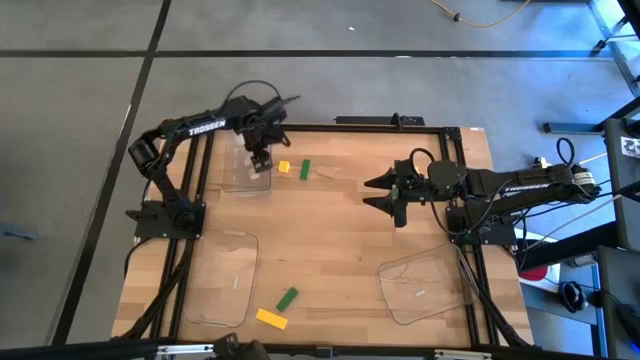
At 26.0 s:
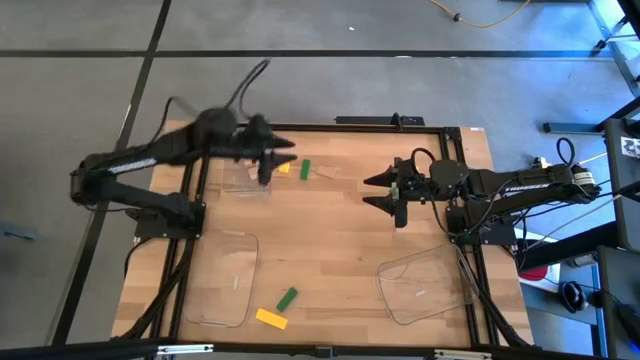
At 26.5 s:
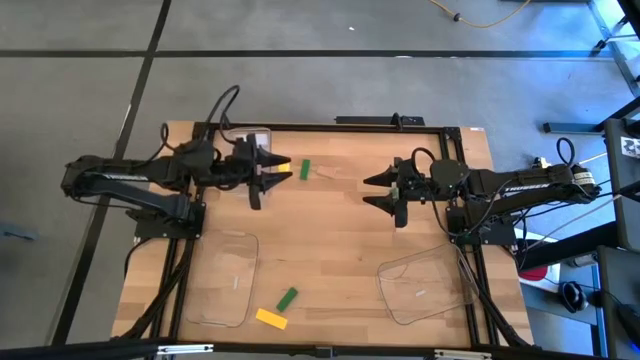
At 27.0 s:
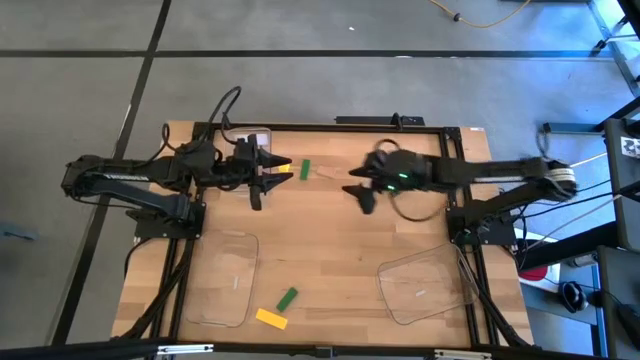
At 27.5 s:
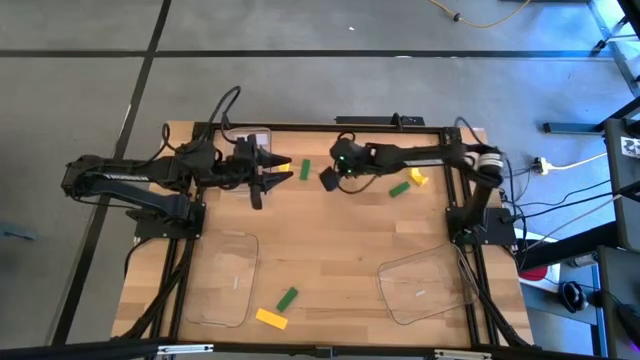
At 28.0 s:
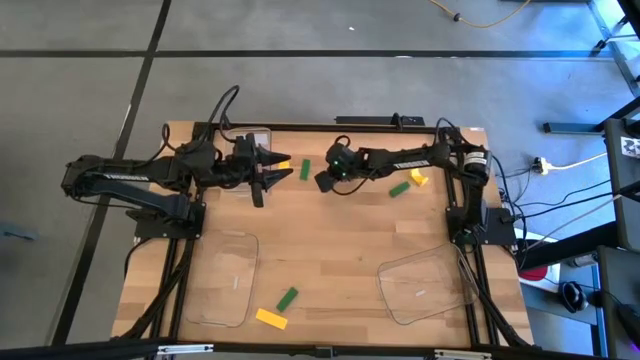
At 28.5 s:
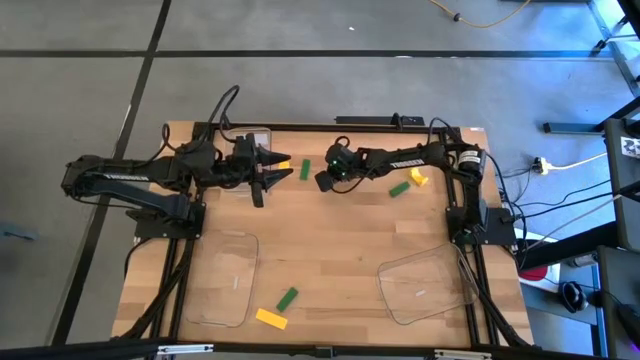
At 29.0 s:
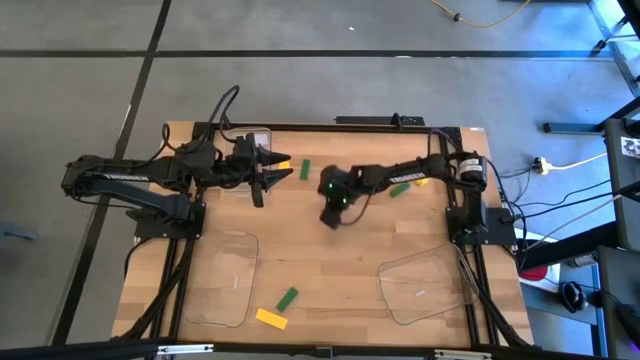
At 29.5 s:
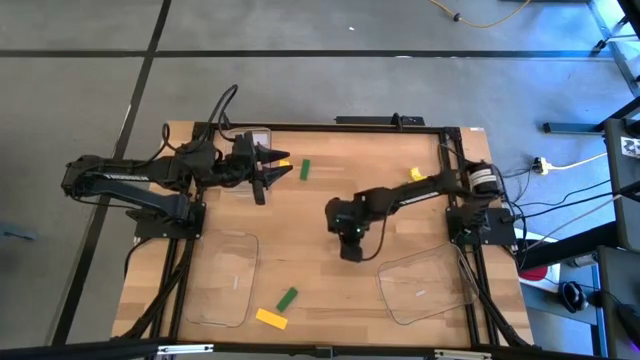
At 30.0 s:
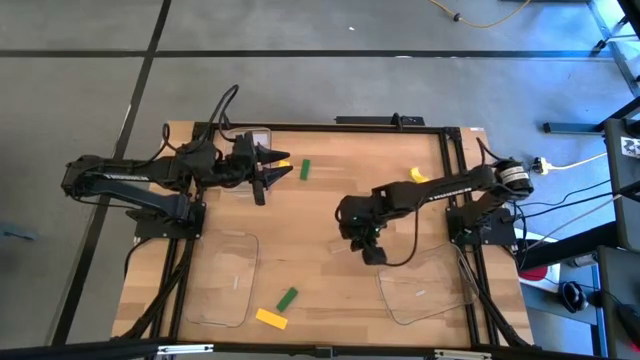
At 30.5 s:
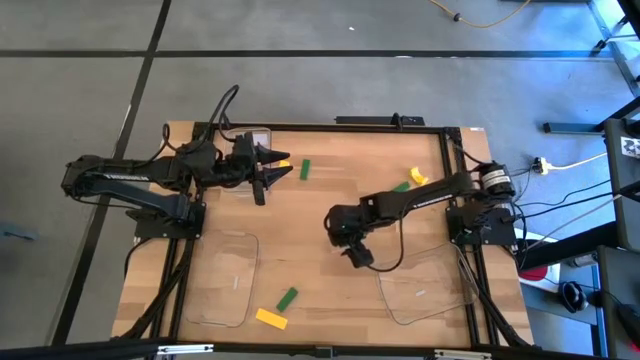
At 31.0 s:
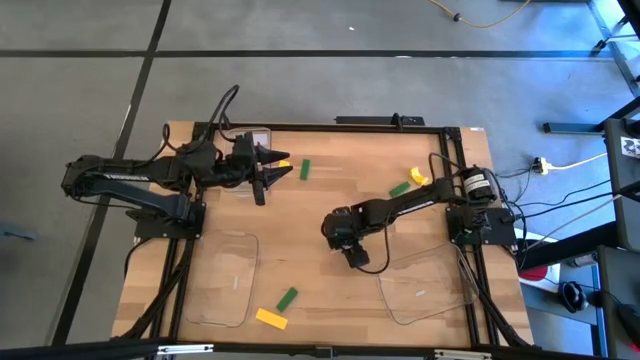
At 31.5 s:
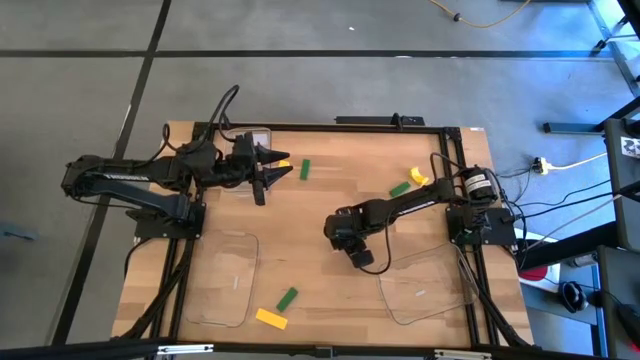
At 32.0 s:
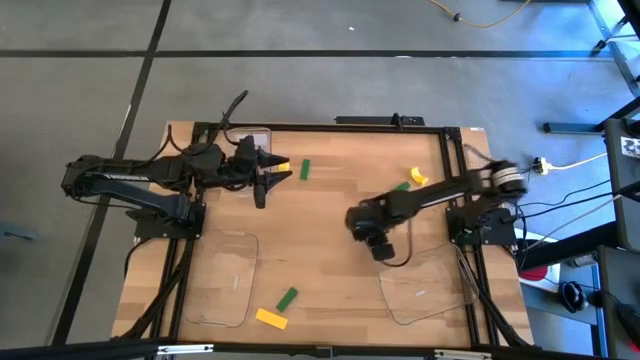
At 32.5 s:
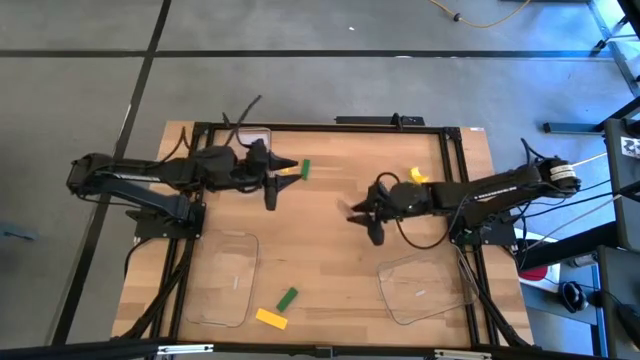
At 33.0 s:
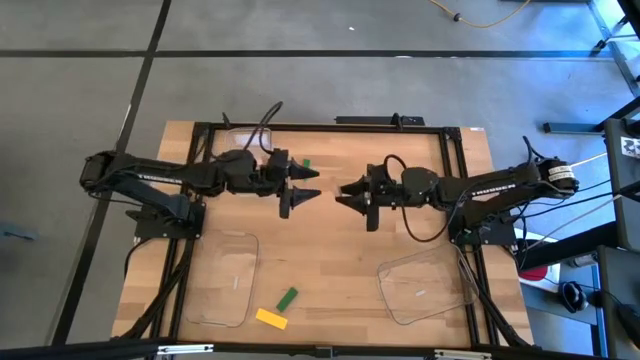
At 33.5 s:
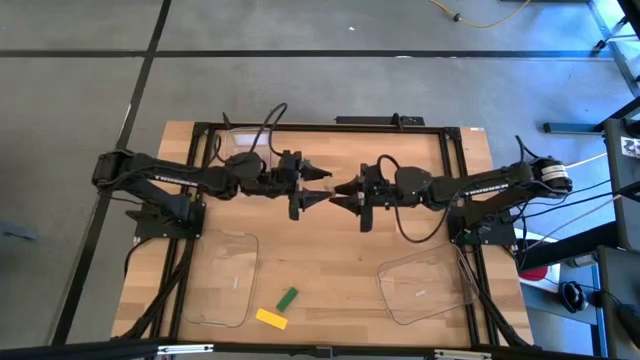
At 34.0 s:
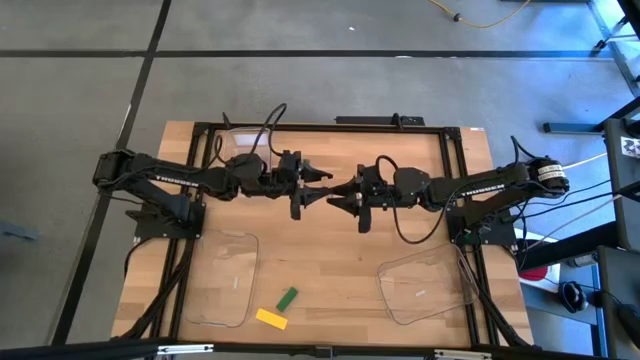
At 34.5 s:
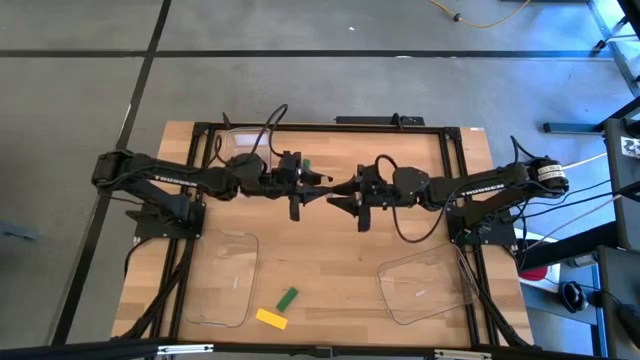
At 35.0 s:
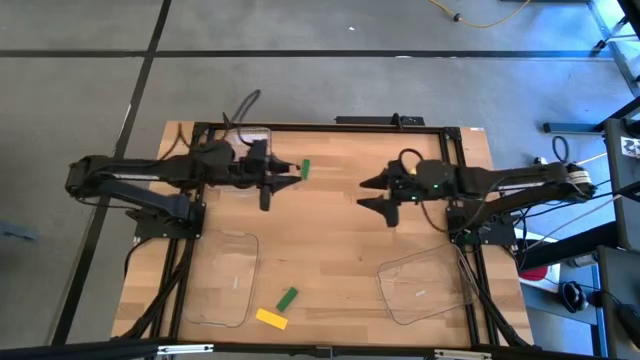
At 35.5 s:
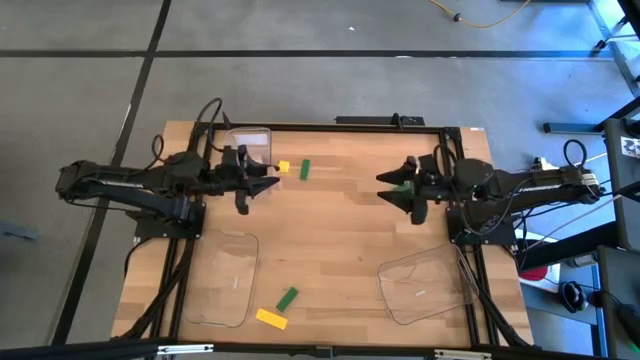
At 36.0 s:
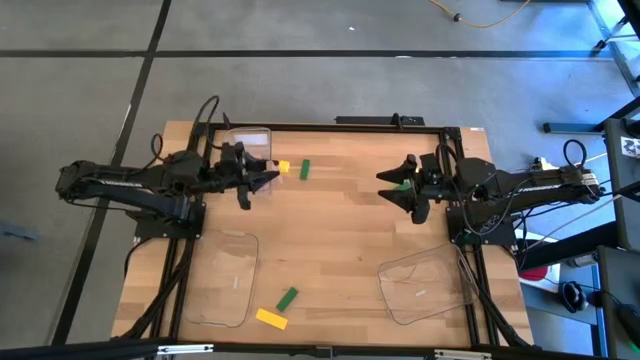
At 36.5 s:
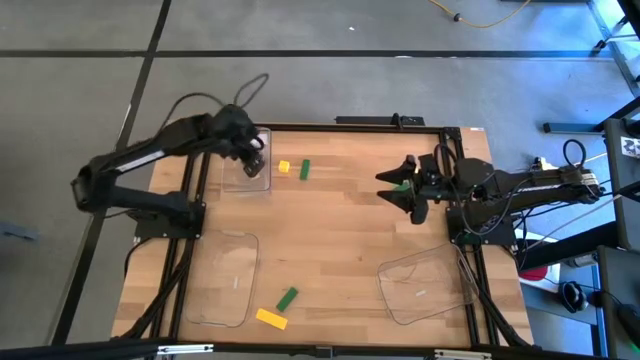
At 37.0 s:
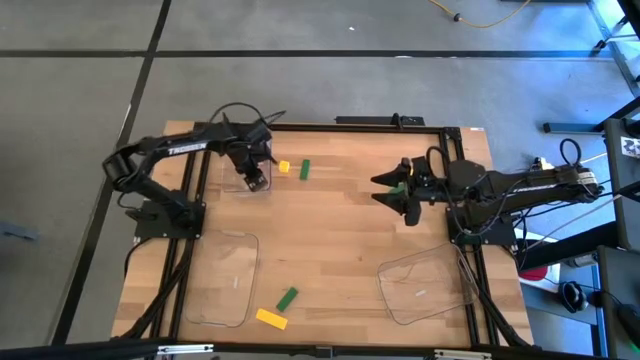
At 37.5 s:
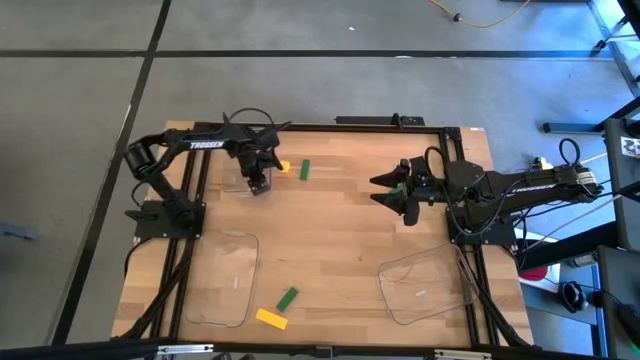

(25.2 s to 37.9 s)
Task: Sort & place blocks by color
Put the brown block into the top left transparent bin

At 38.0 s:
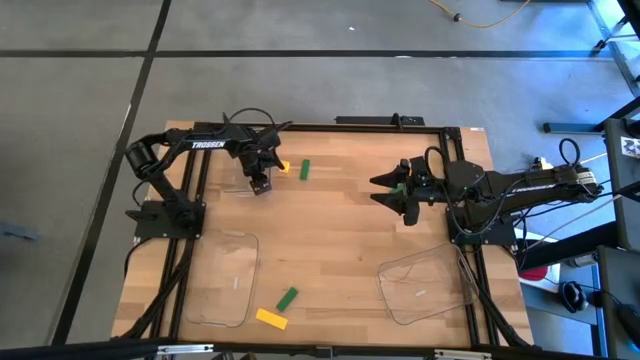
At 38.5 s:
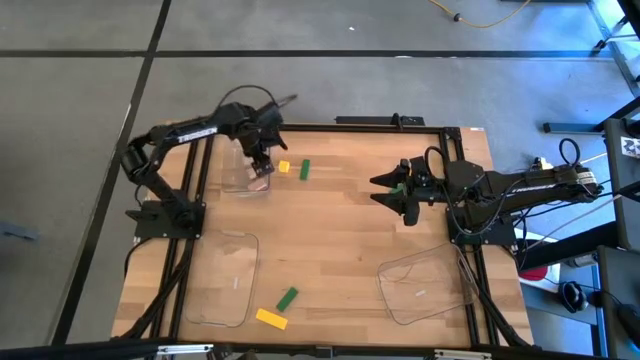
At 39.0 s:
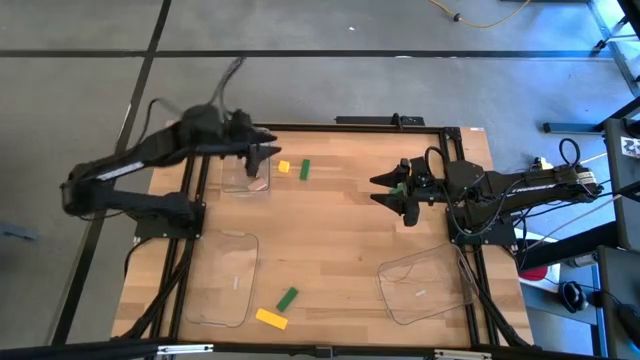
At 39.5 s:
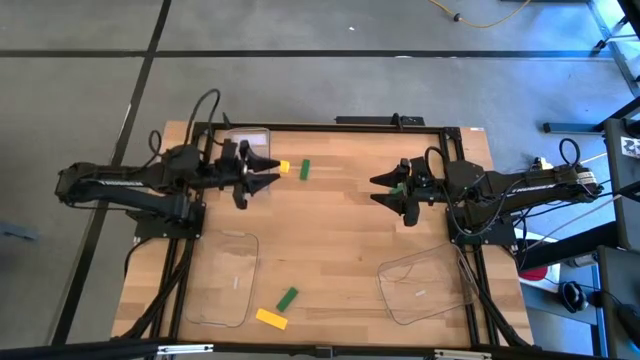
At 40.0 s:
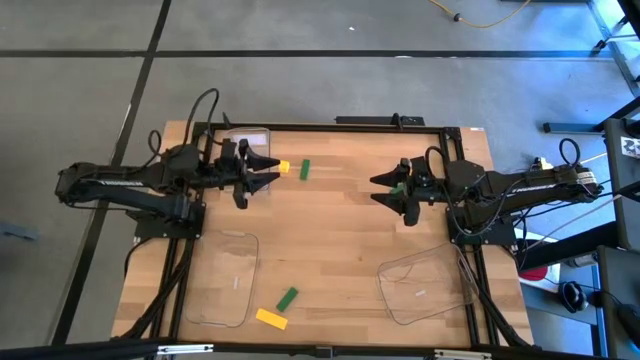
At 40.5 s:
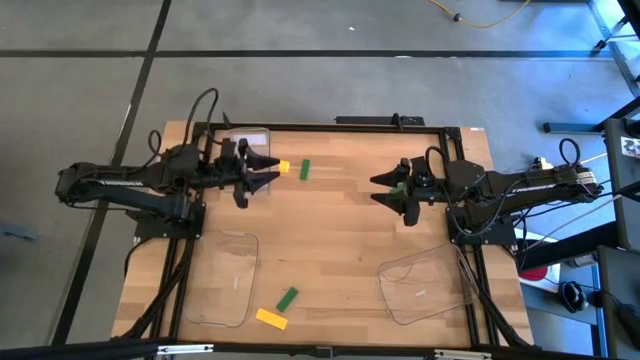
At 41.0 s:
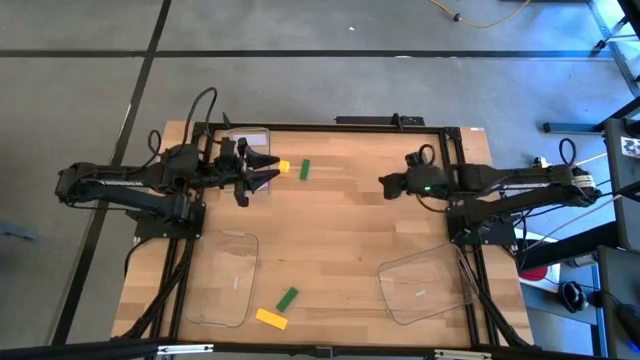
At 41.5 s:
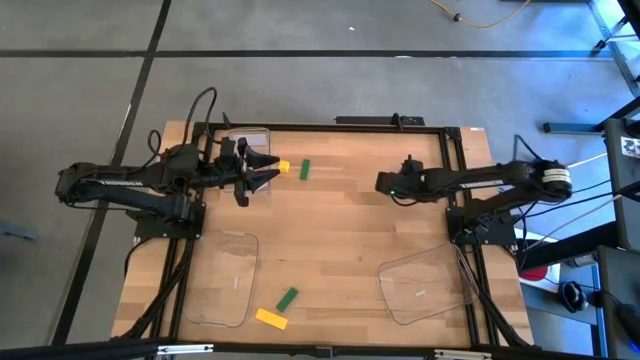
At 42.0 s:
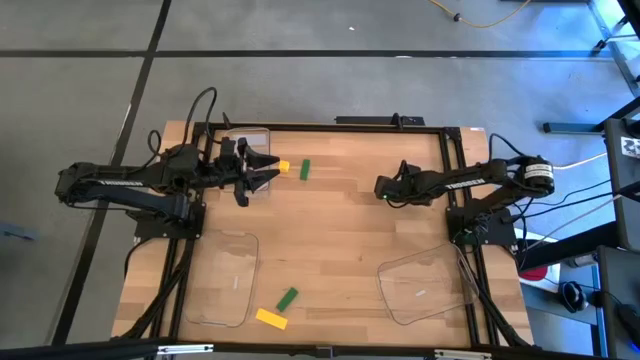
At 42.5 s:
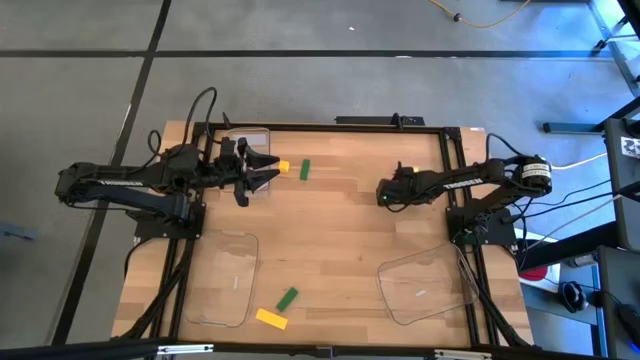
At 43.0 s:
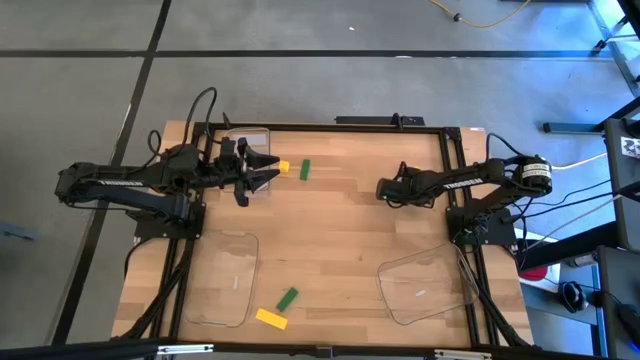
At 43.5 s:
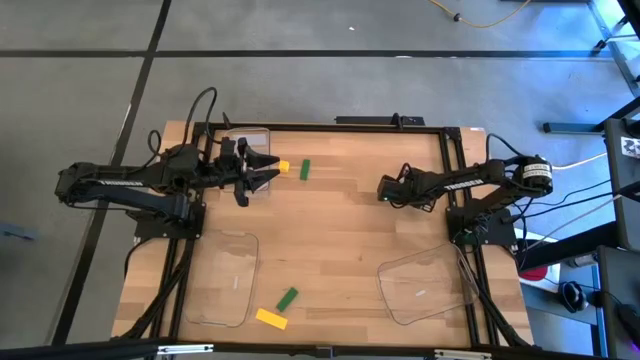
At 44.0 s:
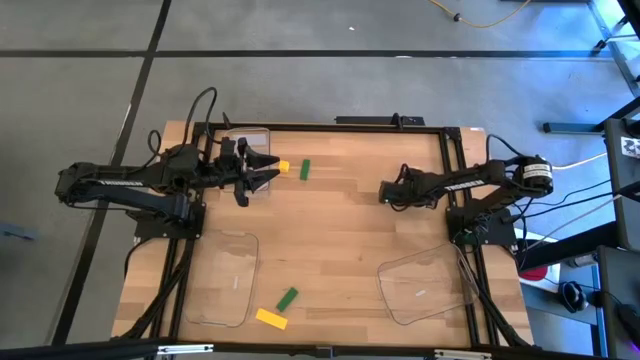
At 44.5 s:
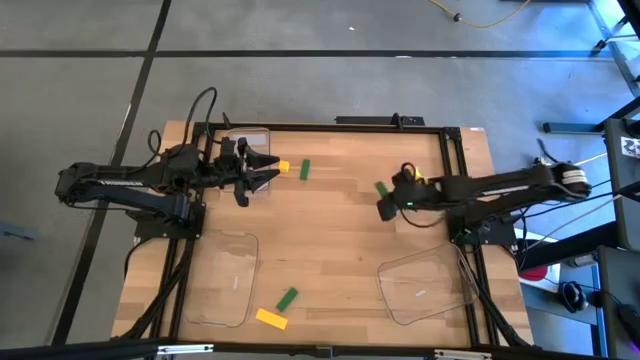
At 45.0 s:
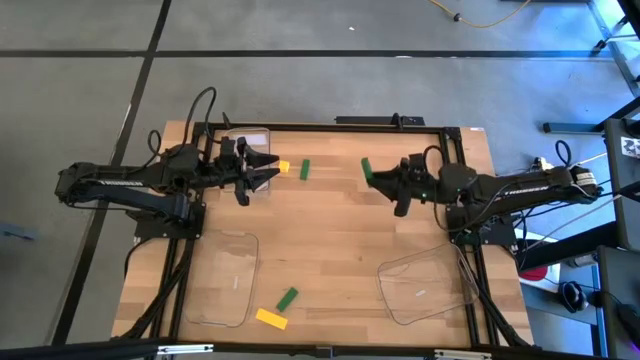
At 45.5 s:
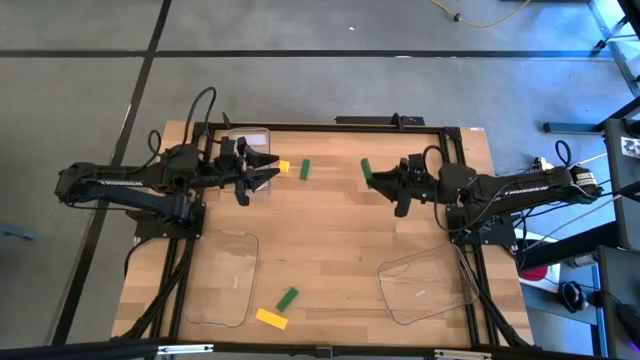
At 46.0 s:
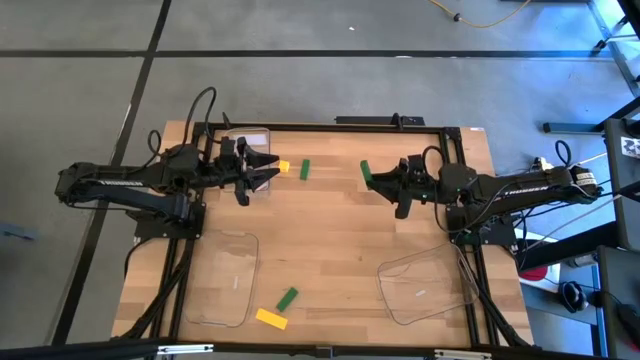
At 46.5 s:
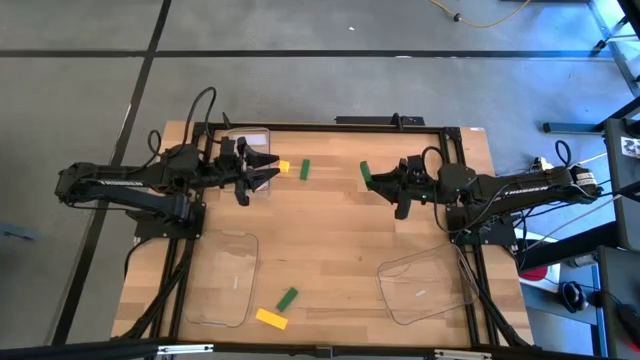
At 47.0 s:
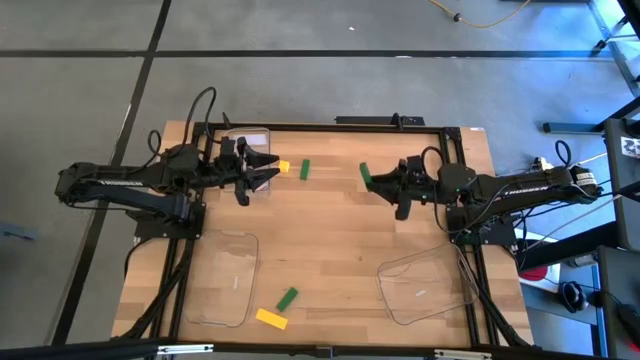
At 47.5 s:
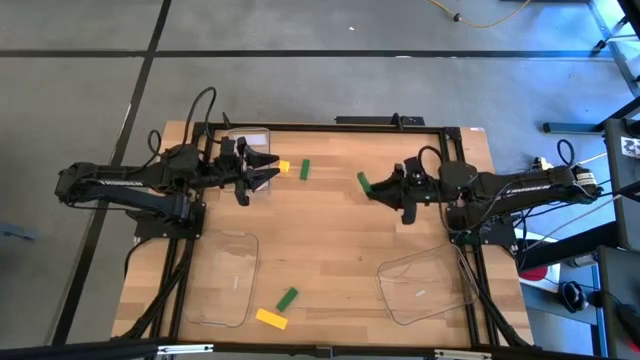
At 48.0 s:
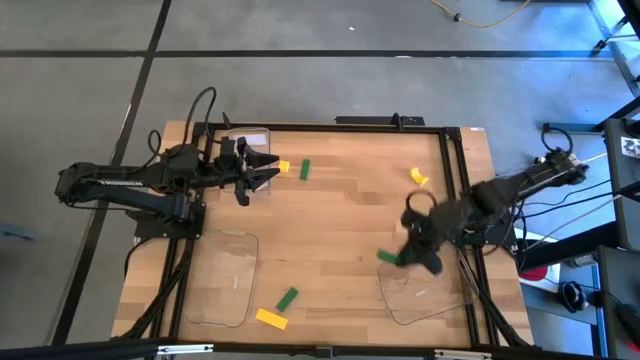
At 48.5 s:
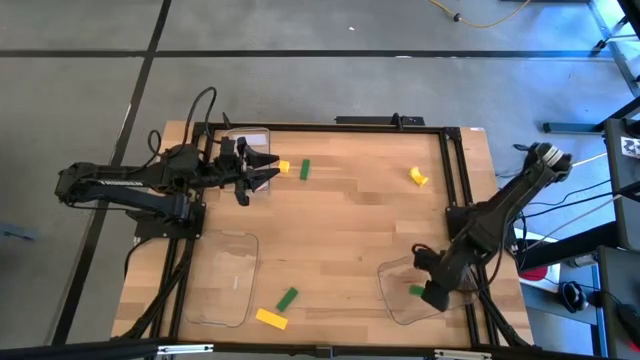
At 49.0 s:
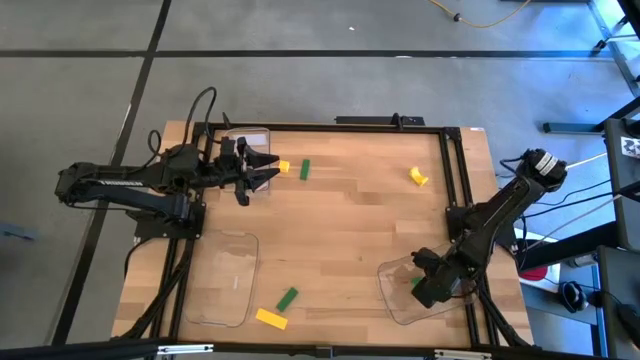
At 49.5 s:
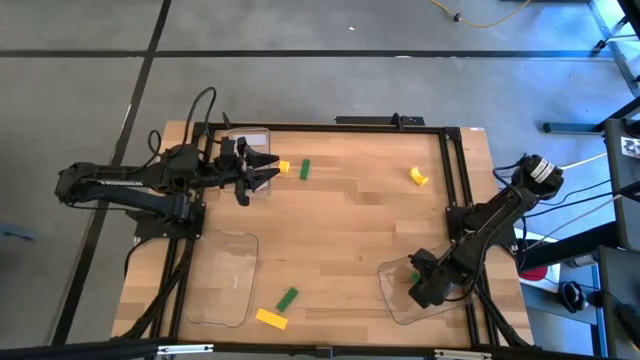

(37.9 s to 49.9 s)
Put the right green block into the bottom right transparent bin
